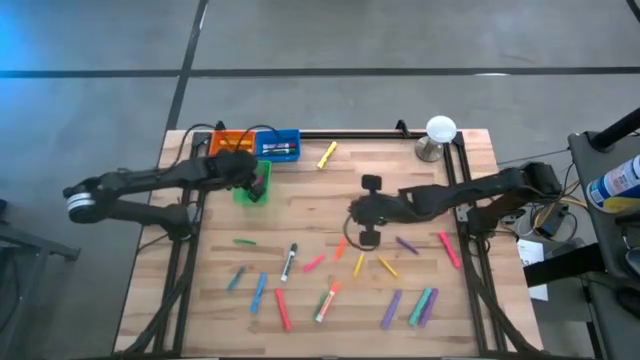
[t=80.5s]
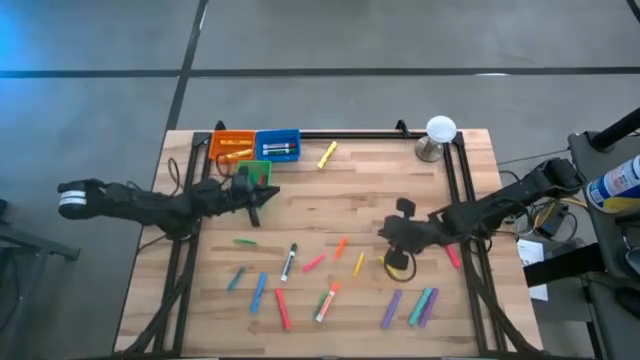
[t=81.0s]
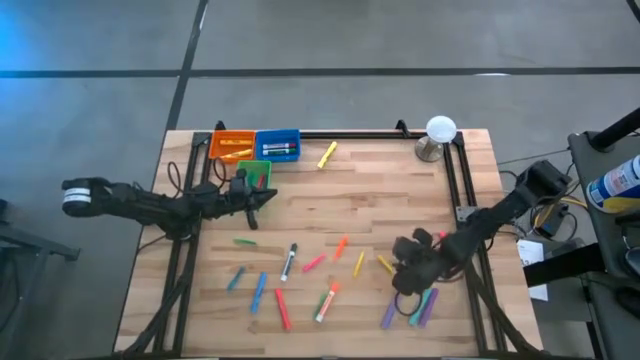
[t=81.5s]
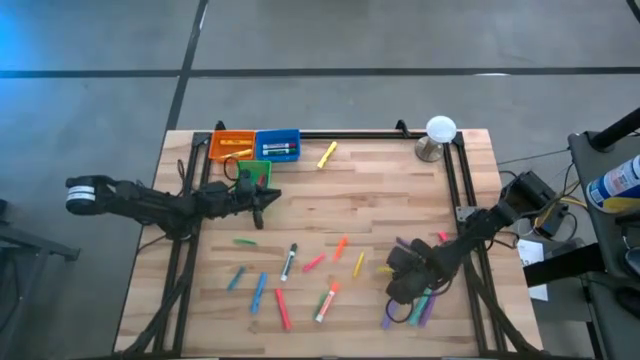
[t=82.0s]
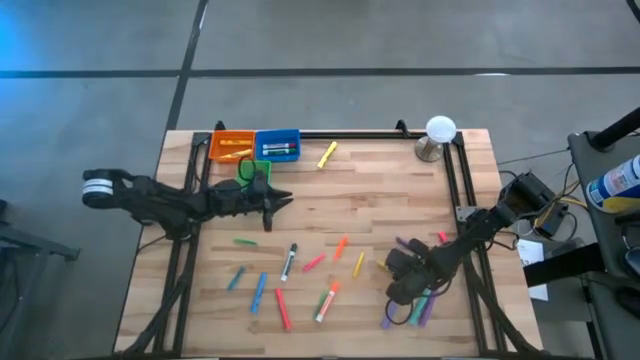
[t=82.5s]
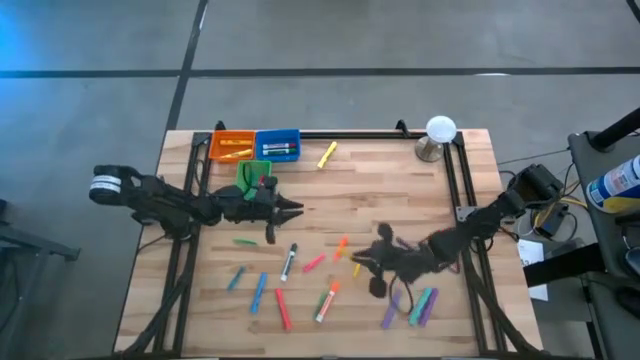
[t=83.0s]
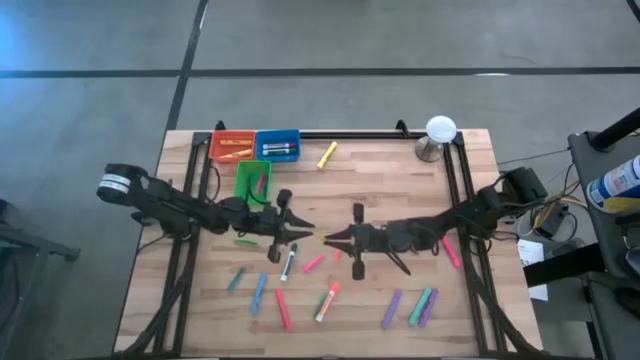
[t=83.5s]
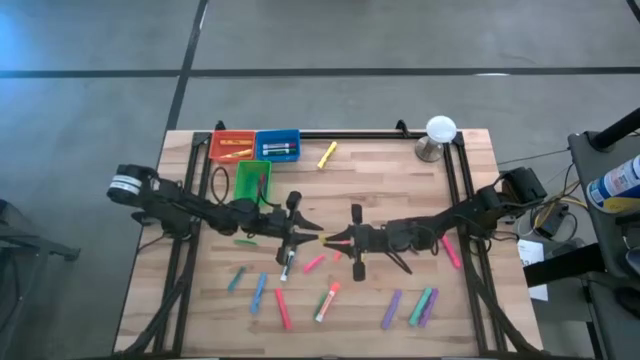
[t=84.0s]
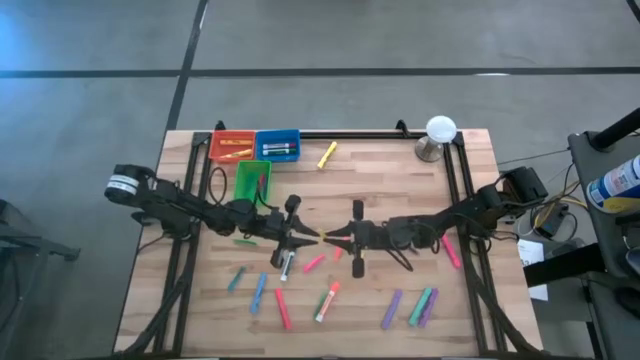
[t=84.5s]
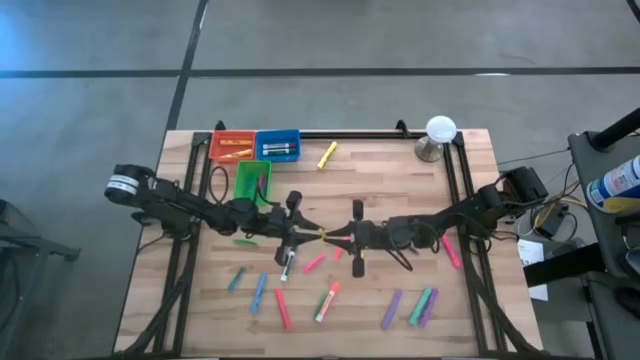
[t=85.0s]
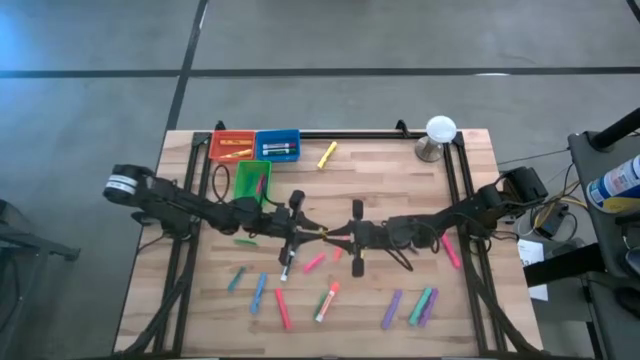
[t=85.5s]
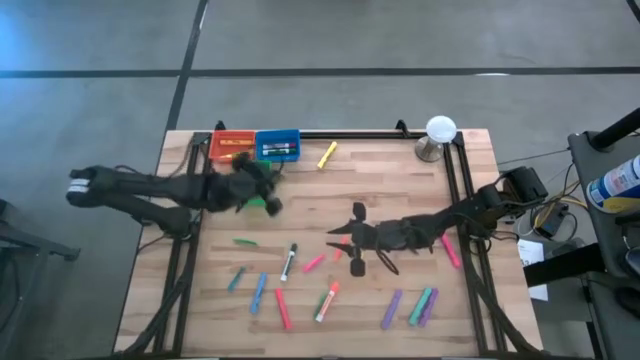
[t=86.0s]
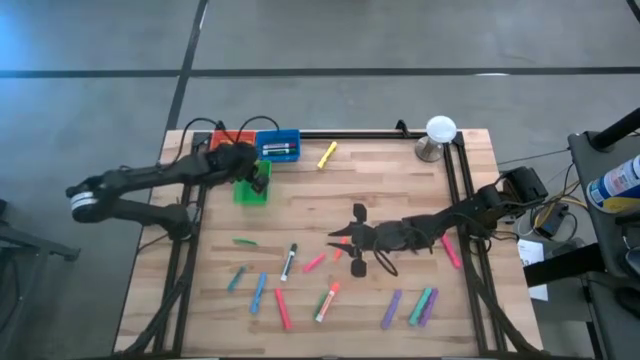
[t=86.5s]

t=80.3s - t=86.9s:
Task: Pick & Place Markers
Put the yellow pen into the green bin

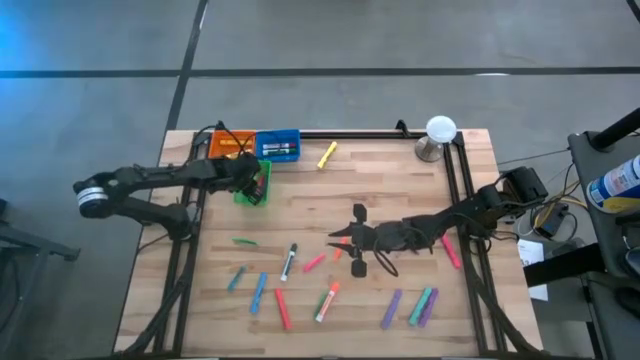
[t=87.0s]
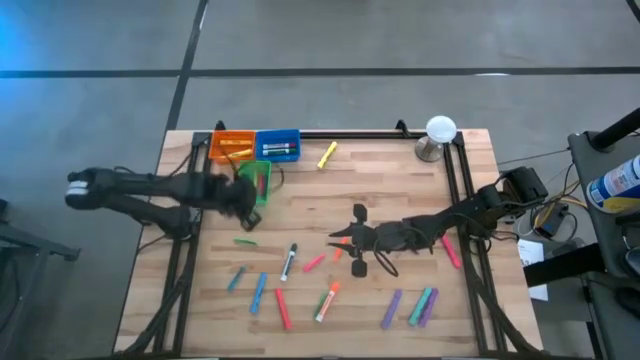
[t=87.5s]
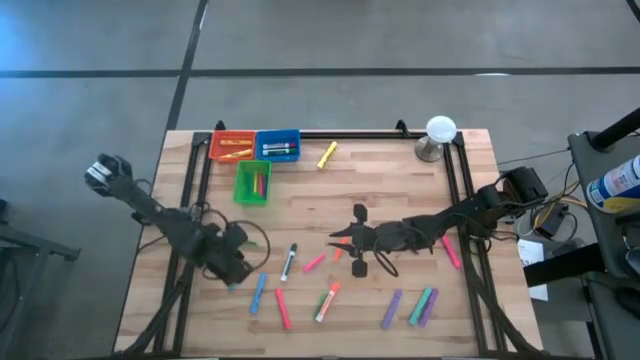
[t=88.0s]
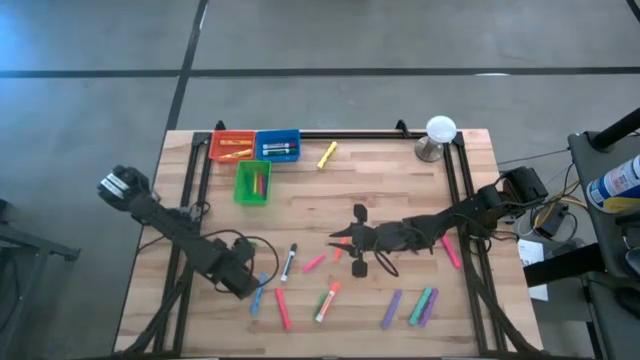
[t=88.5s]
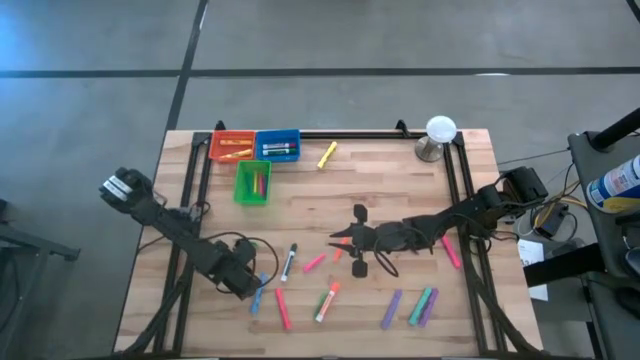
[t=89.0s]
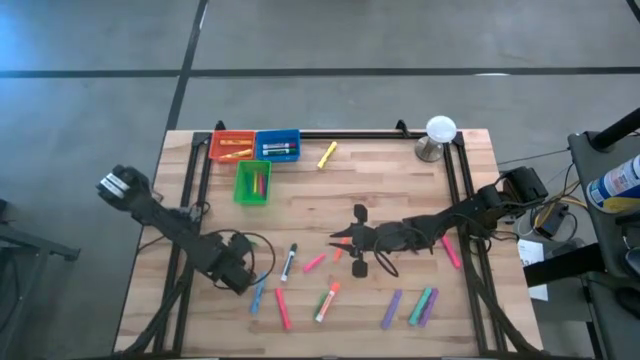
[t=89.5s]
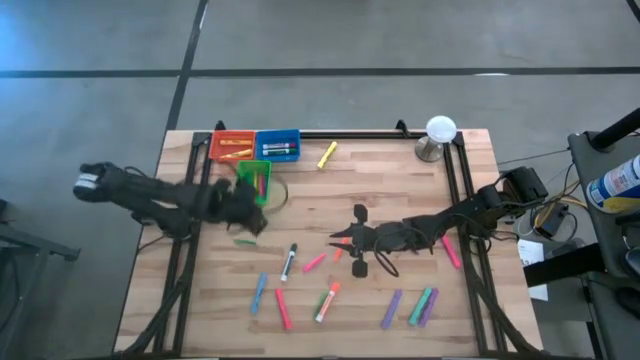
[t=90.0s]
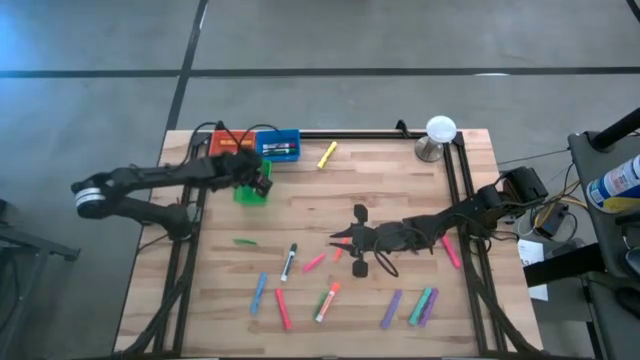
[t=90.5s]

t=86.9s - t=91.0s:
Put the blue pen into the green bin

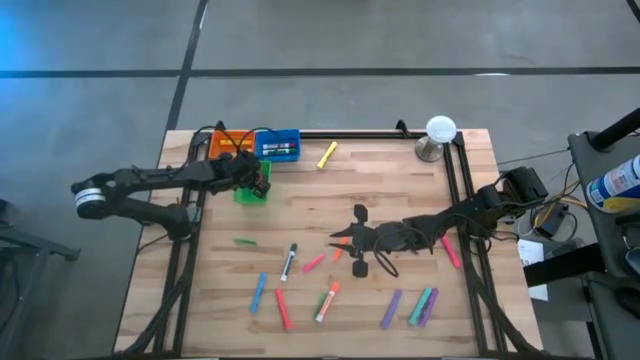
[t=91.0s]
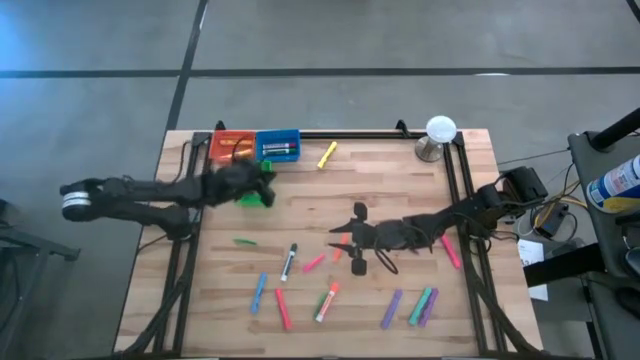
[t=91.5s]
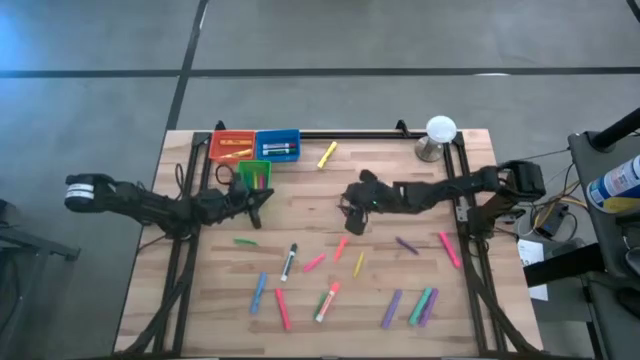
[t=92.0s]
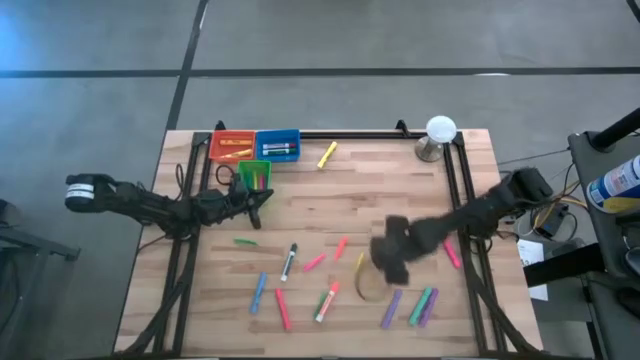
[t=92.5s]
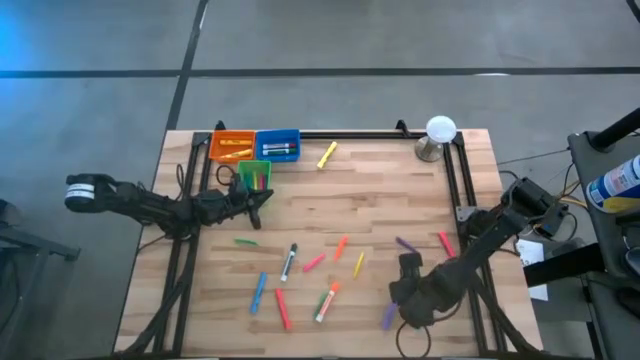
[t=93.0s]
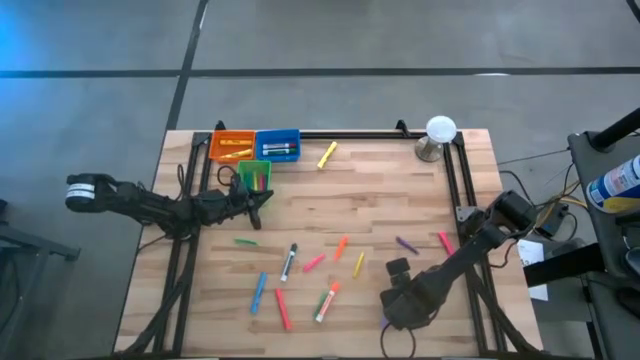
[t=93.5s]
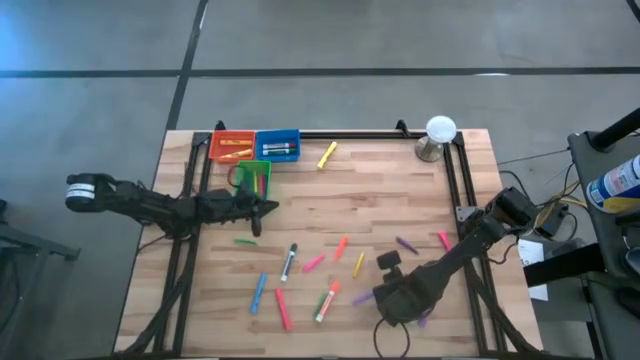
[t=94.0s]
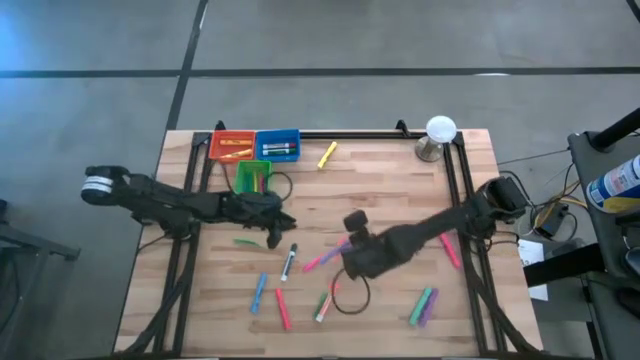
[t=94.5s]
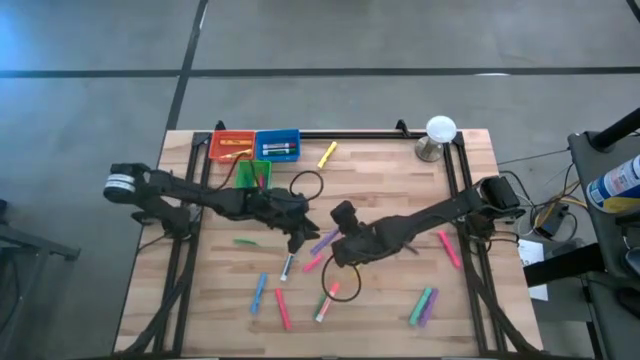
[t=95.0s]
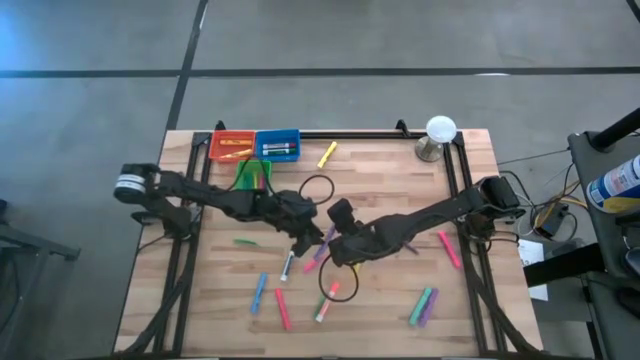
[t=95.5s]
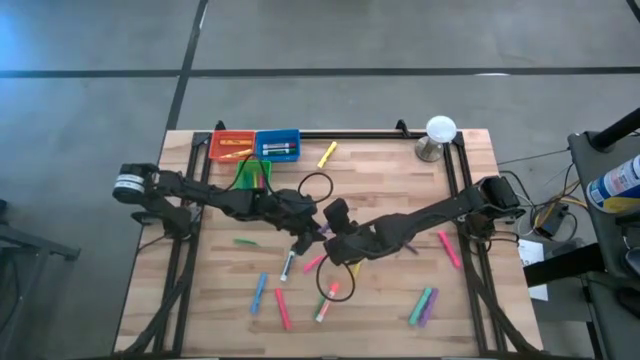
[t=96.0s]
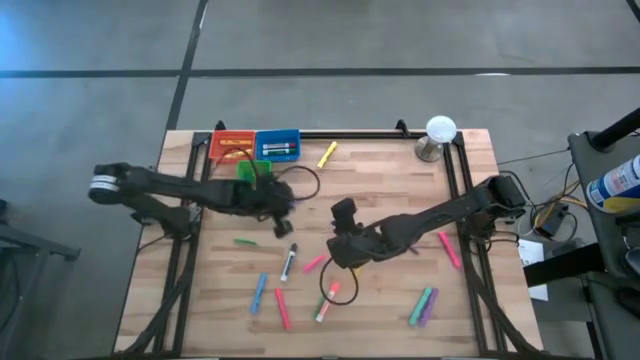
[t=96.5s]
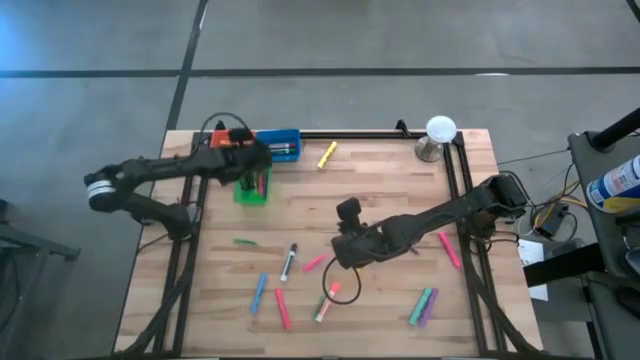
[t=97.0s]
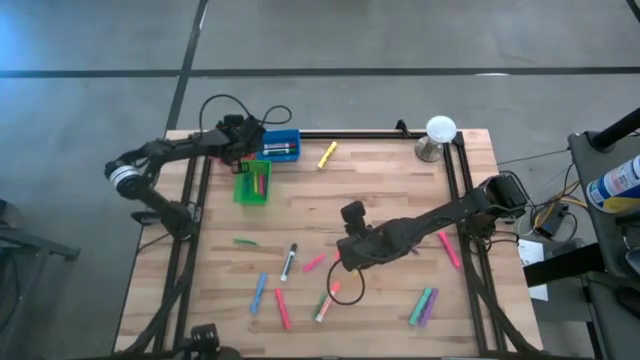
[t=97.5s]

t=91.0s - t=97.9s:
Put the purple highlighter into the orange bin

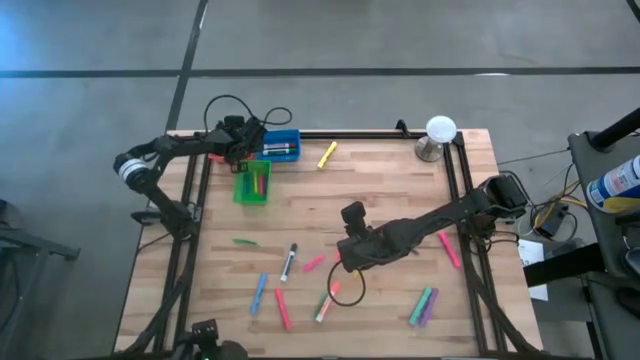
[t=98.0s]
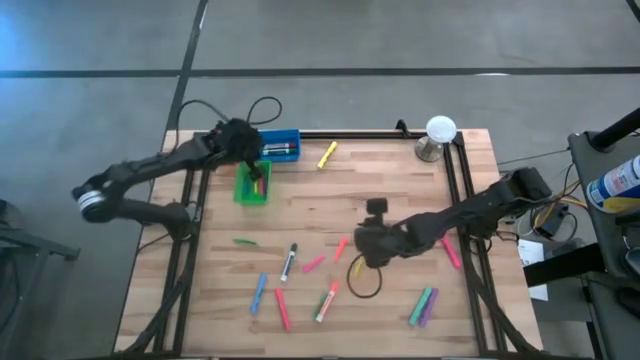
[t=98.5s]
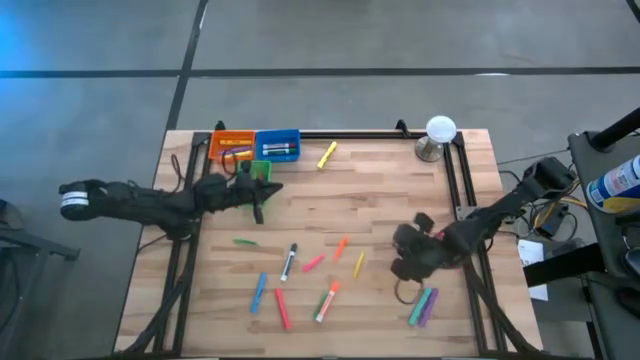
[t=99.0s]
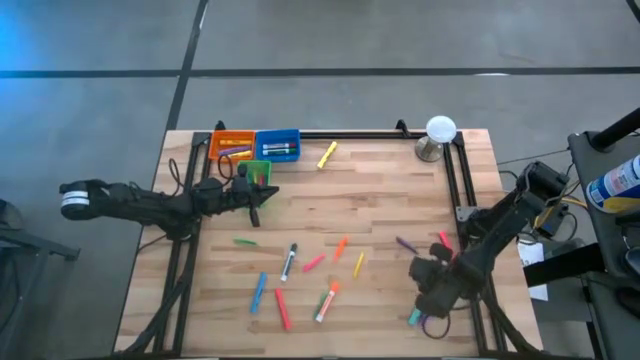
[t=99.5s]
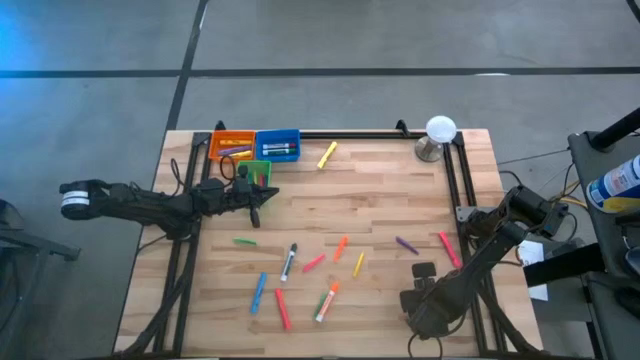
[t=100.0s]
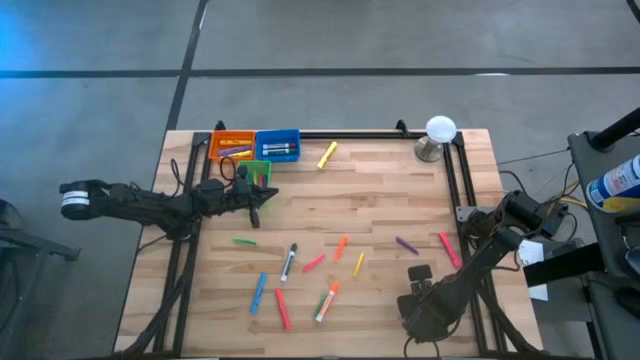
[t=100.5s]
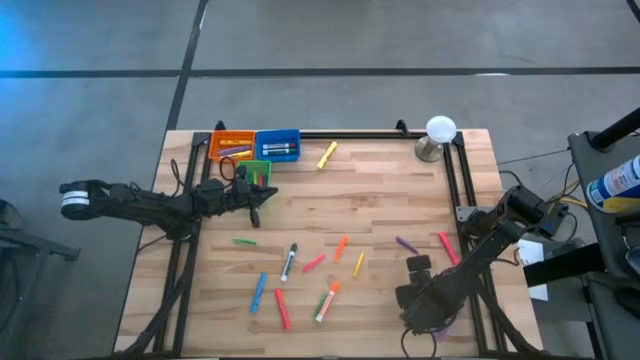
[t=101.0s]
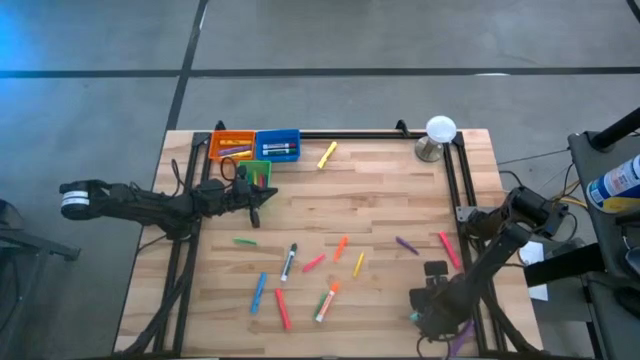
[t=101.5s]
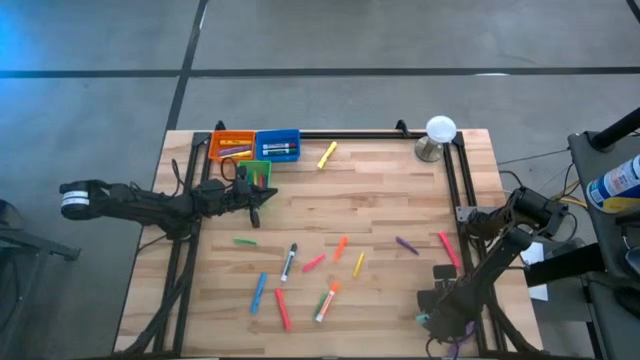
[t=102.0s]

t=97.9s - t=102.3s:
Put the light blue highlighter into the orange bin
